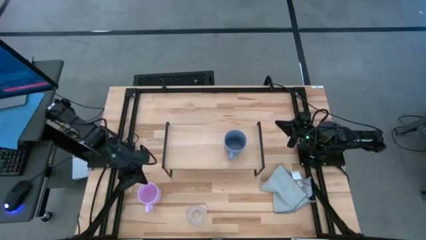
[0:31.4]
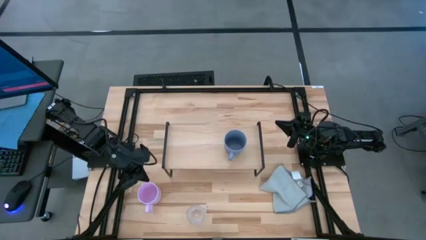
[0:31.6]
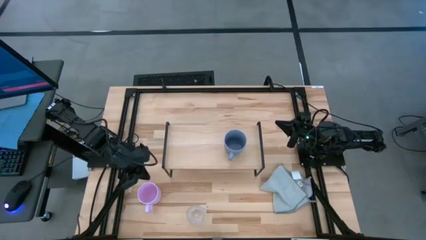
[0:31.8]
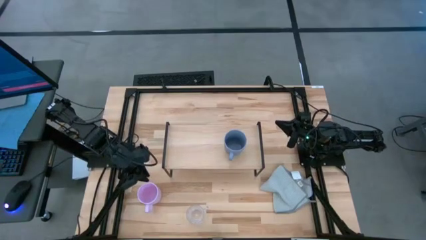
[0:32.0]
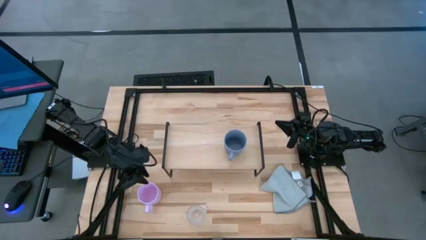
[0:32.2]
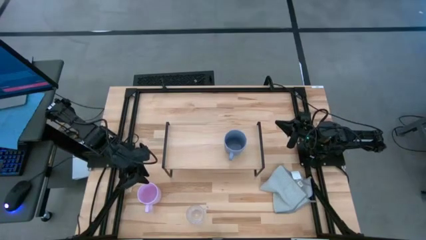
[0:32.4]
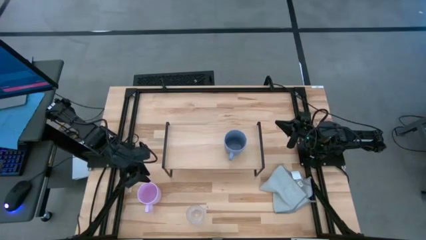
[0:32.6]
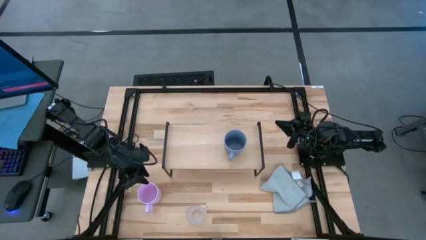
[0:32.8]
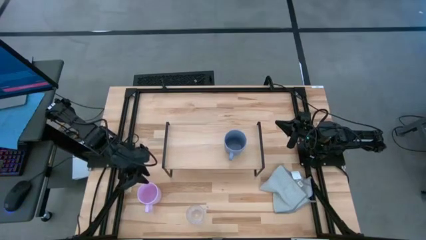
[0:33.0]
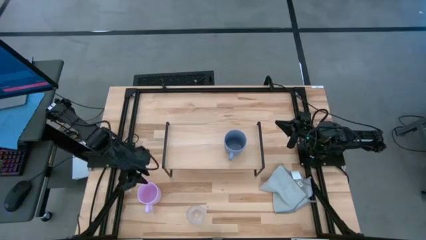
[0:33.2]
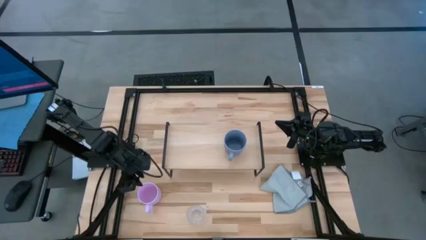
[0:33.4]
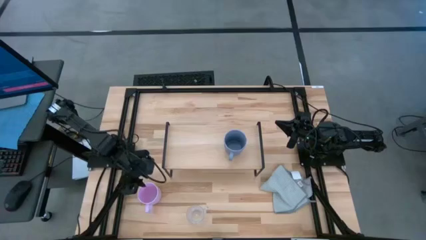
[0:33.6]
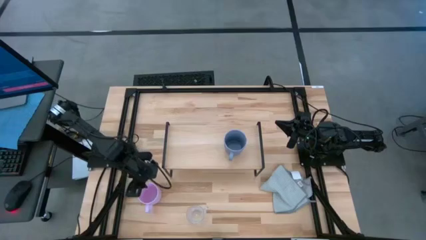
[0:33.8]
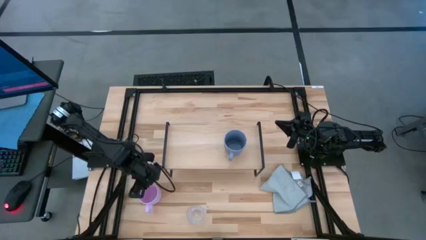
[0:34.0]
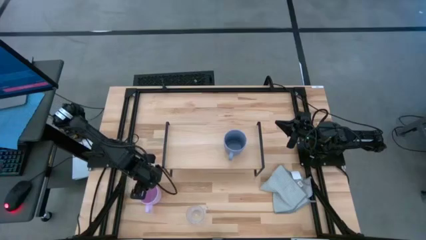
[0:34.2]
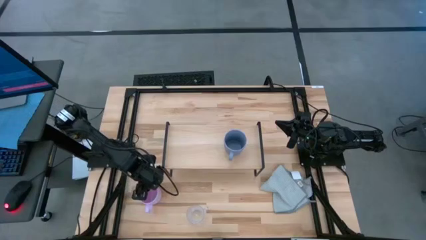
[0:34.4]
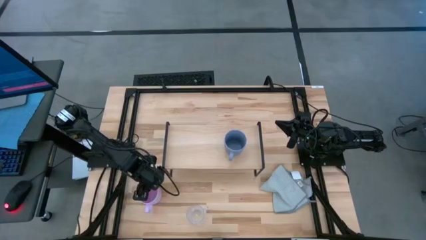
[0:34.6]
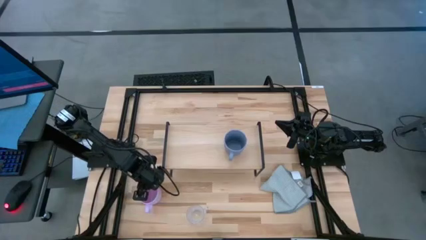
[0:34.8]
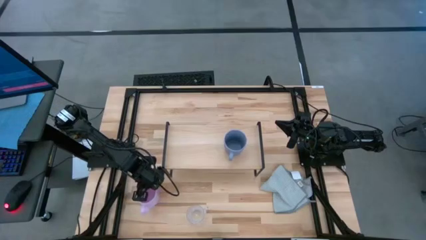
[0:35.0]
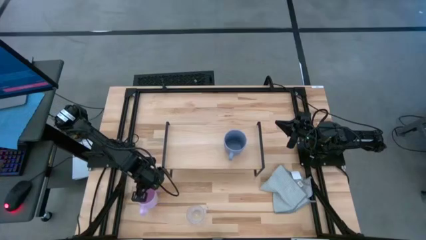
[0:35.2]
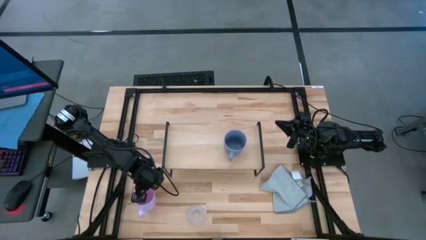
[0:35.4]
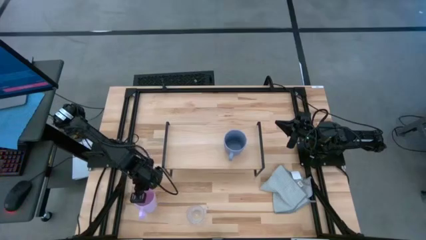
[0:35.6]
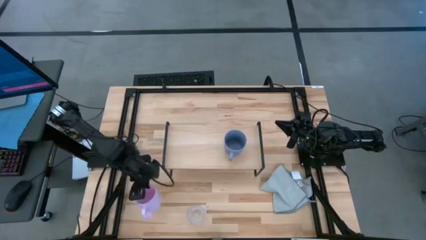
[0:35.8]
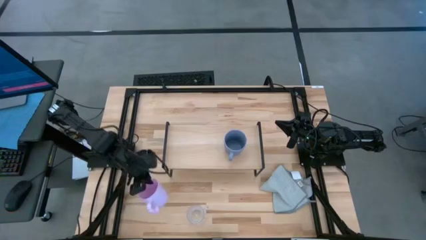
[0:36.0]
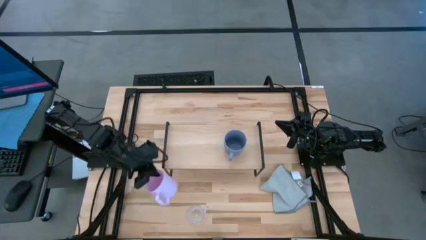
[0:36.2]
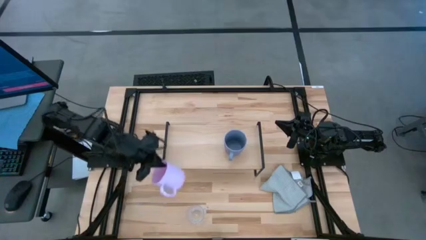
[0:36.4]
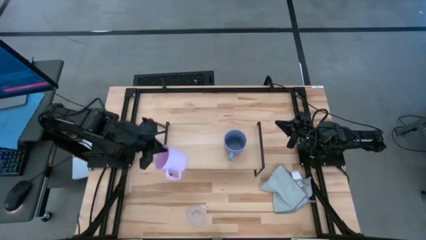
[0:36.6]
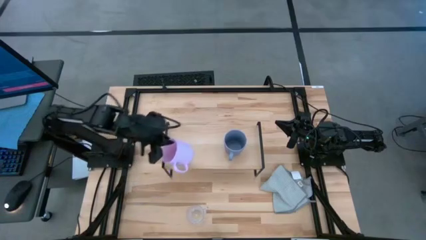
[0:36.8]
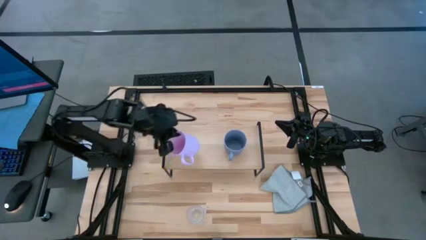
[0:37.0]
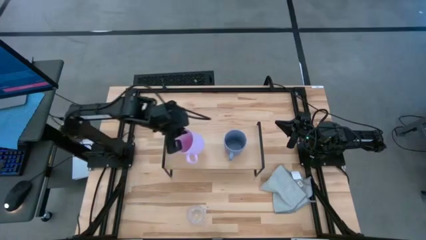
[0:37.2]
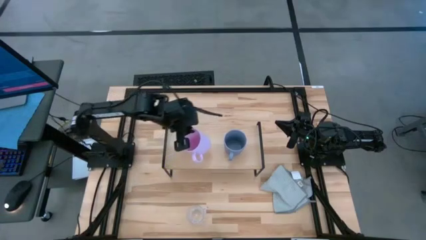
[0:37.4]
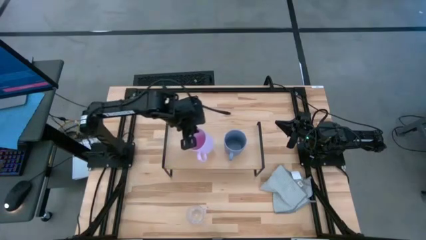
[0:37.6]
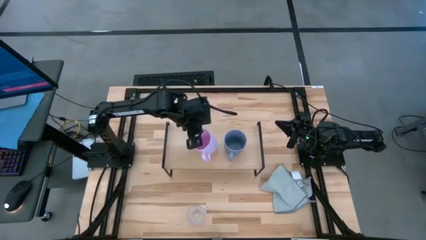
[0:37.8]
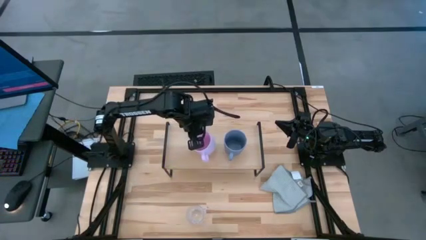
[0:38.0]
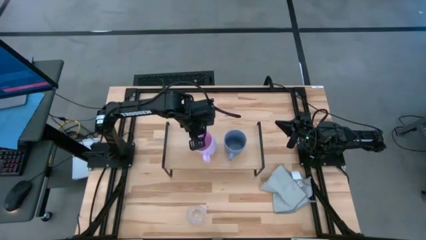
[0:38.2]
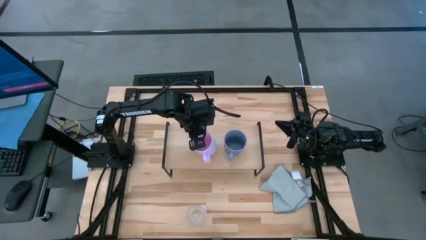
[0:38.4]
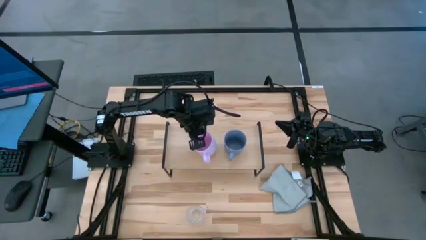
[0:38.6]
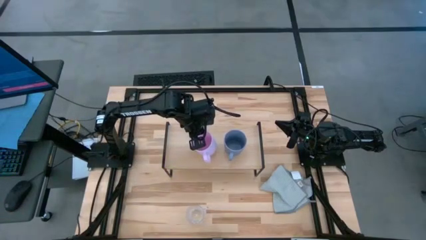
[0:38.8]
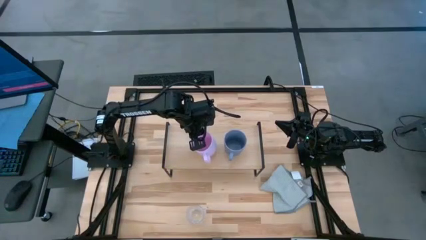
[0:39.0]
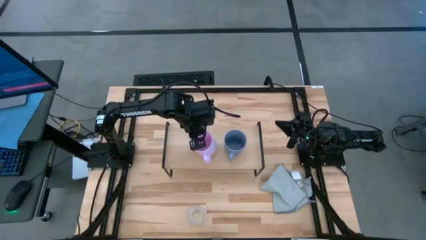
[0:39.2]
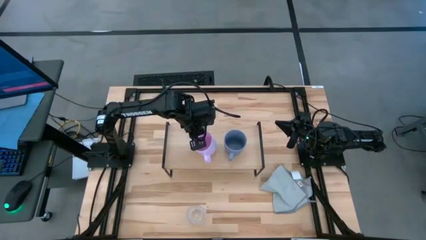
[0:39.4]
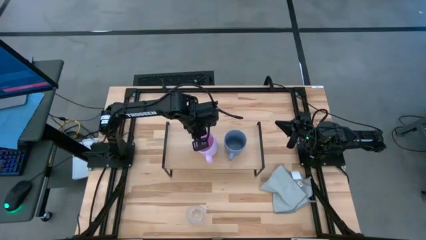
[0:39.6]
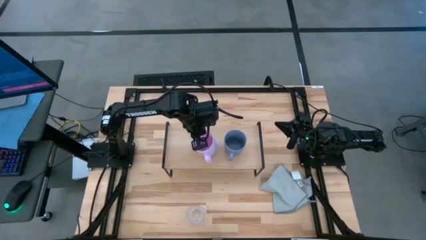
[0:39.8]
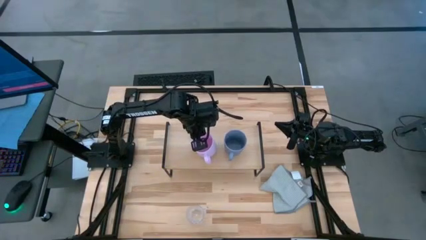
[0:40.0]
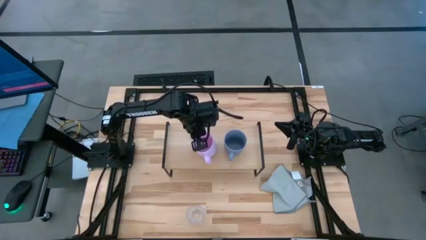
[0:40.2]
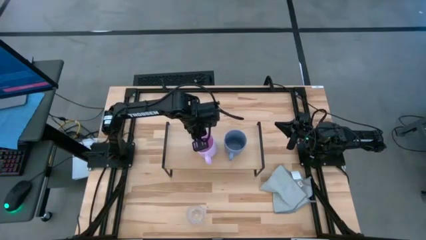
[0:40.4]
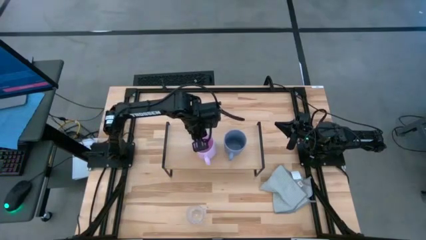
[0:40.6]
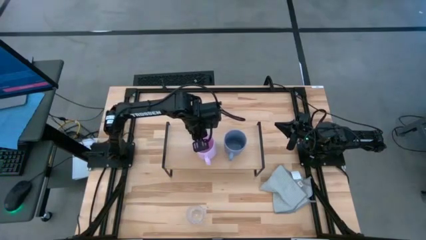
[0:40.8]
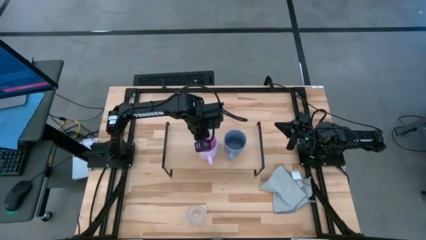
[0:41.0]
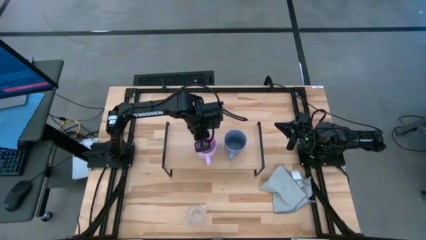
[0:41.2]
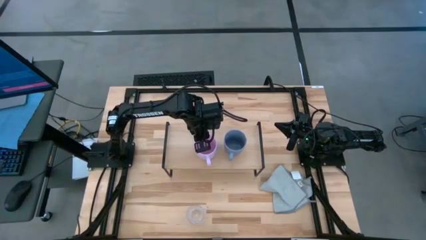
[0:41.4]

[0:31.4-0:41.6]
Task: Stack small to large cups/mugs on shelf
Put the pink mug on the shelf
